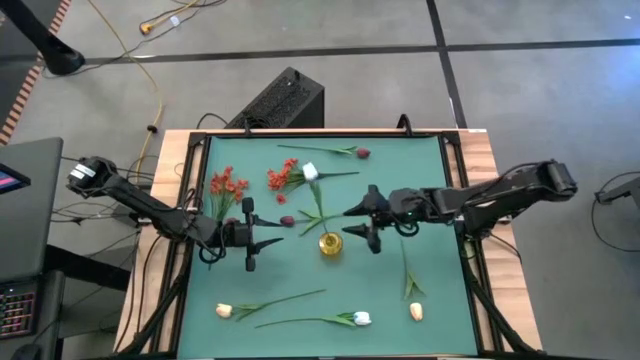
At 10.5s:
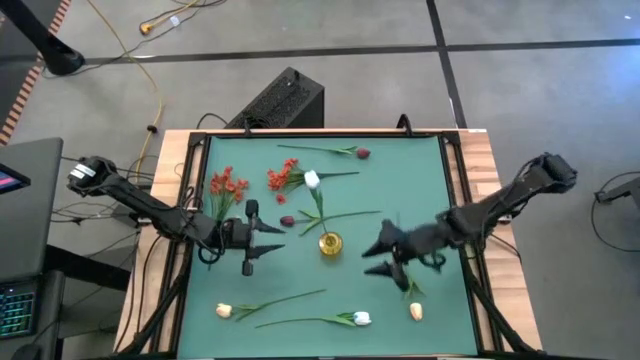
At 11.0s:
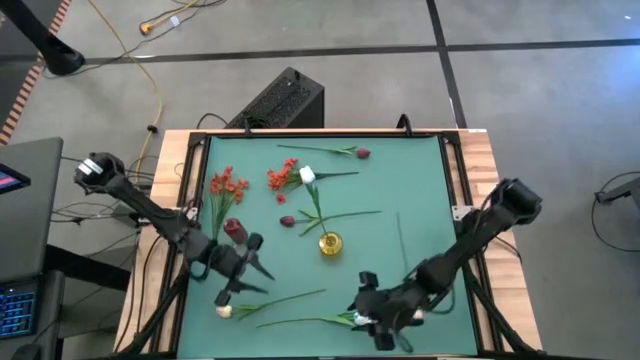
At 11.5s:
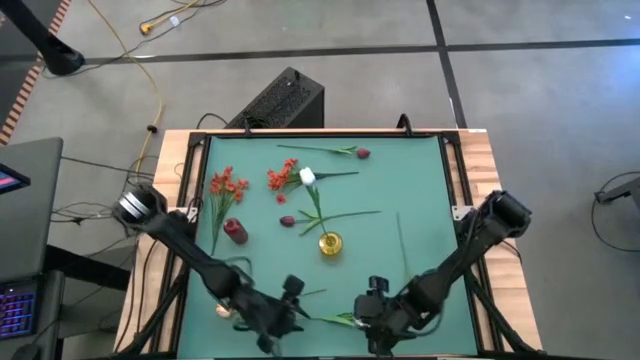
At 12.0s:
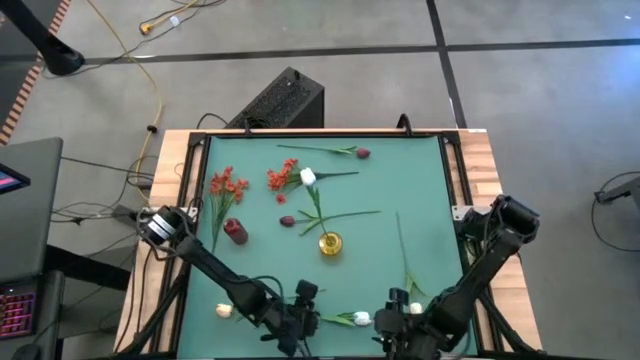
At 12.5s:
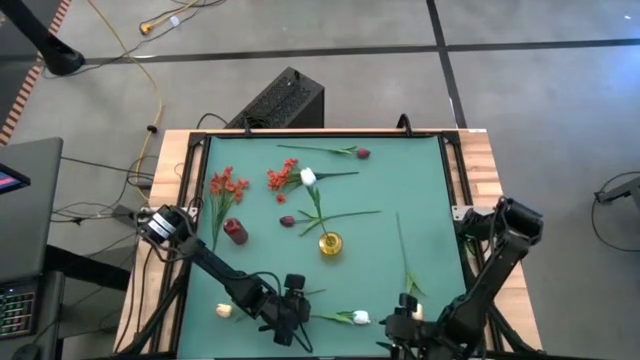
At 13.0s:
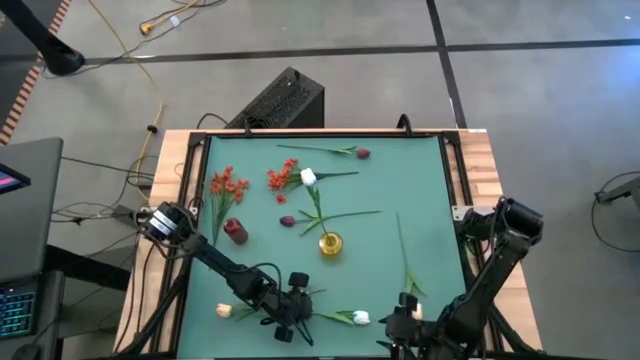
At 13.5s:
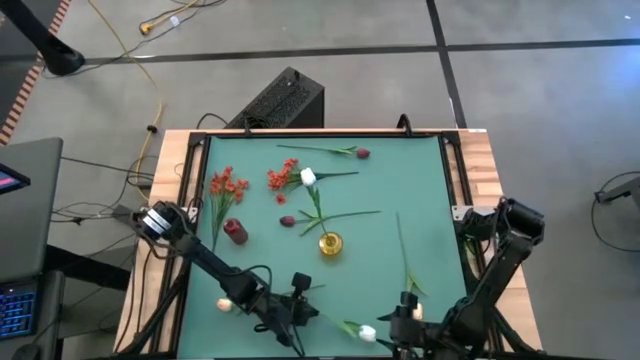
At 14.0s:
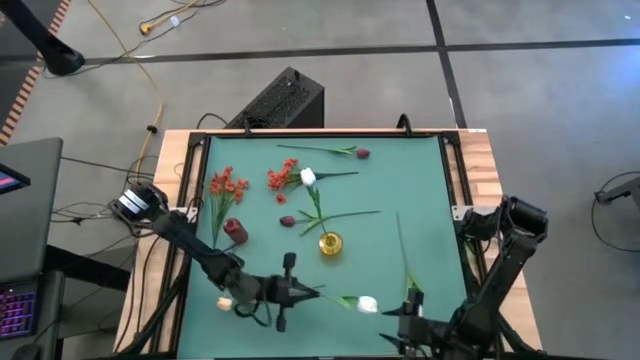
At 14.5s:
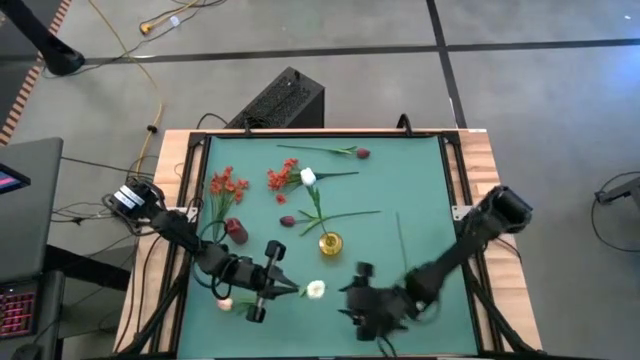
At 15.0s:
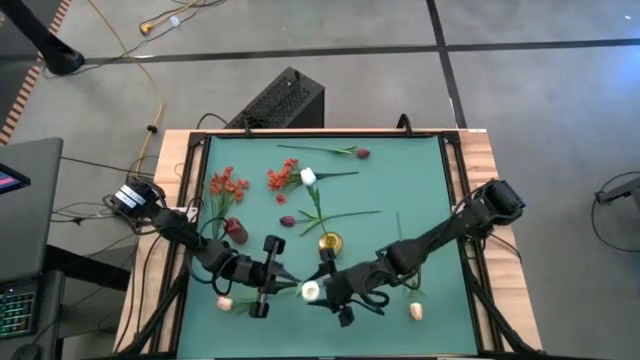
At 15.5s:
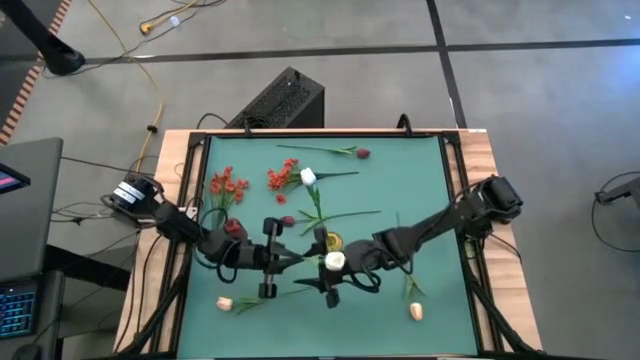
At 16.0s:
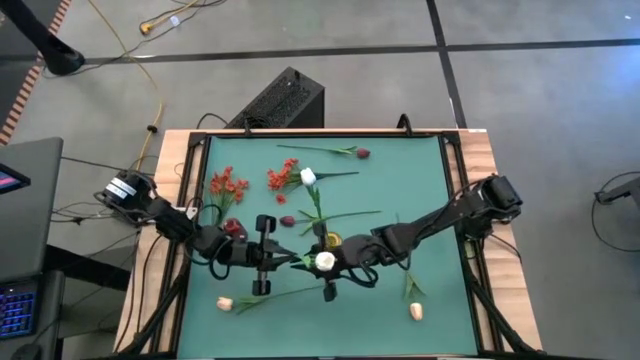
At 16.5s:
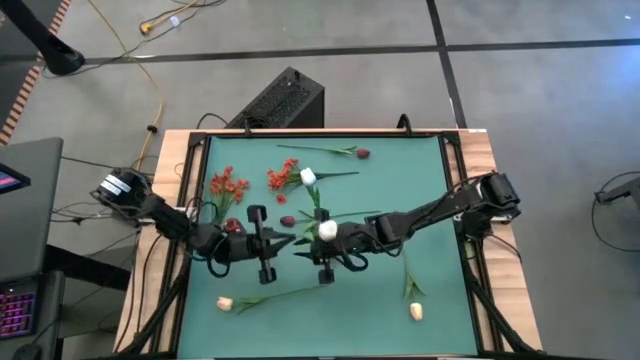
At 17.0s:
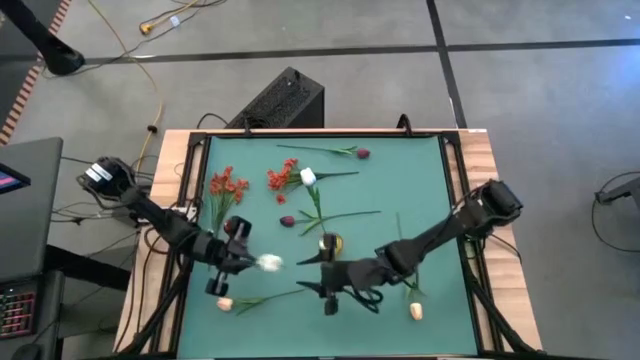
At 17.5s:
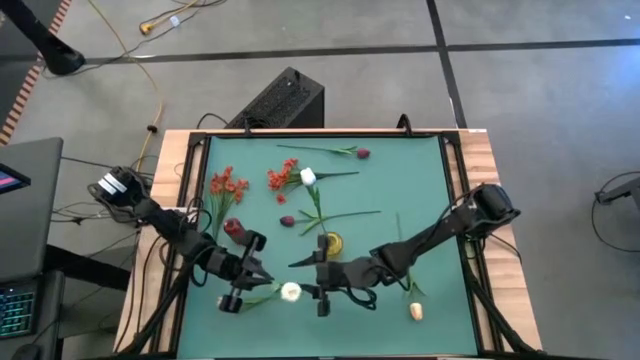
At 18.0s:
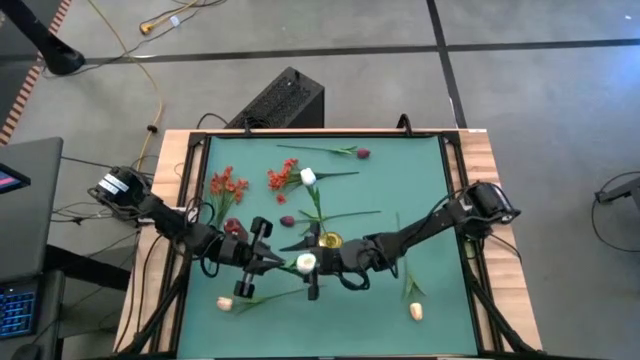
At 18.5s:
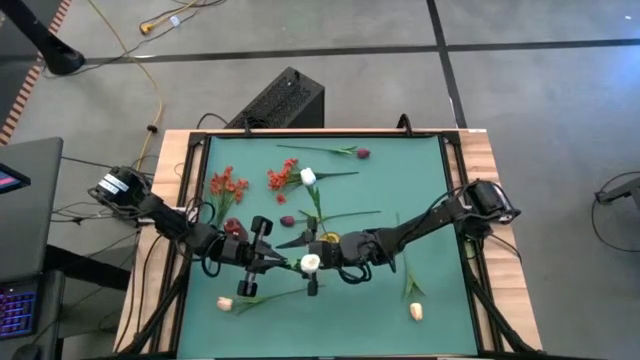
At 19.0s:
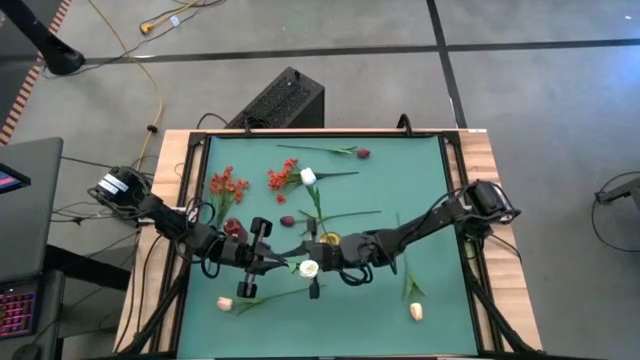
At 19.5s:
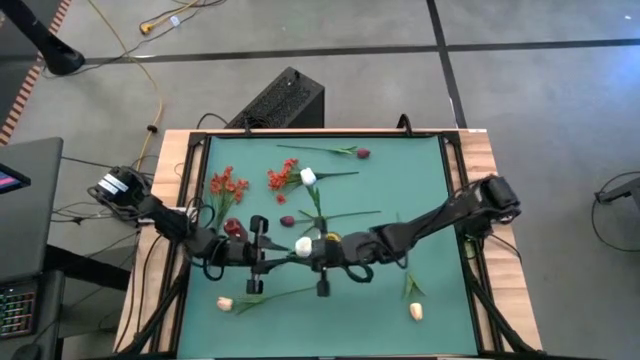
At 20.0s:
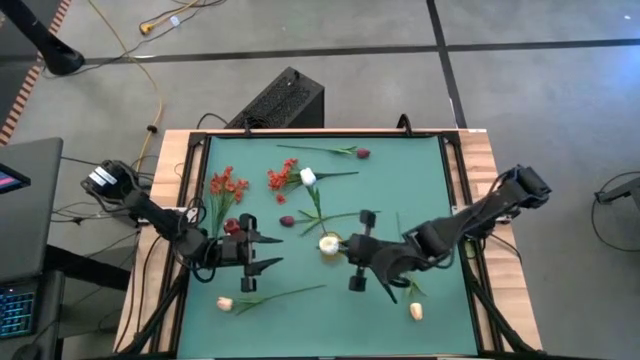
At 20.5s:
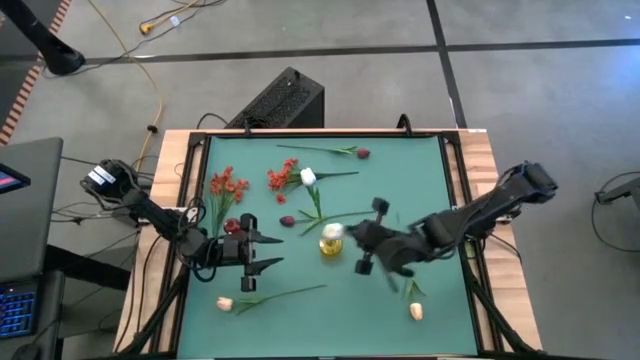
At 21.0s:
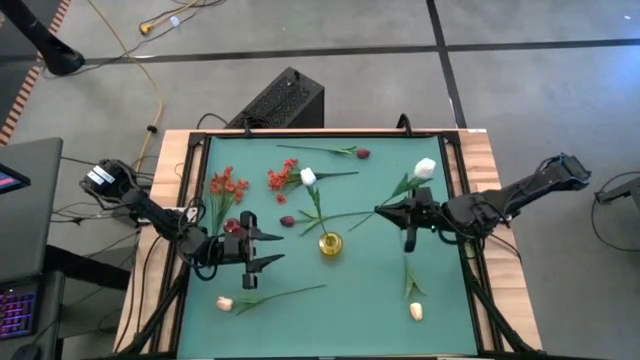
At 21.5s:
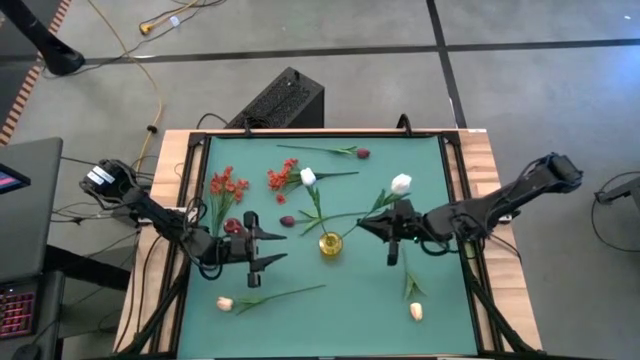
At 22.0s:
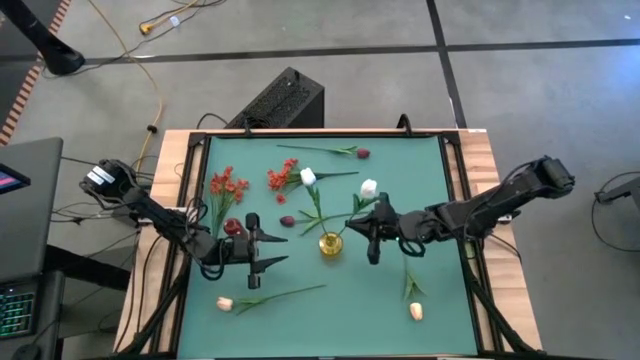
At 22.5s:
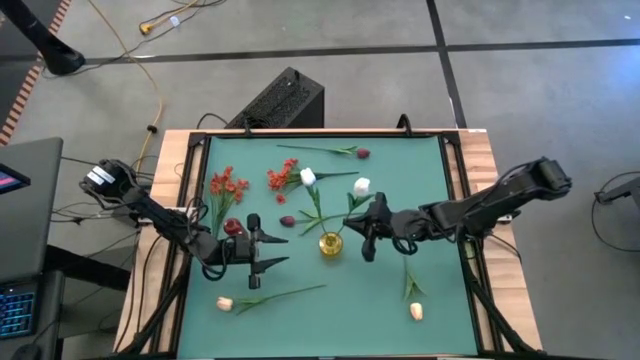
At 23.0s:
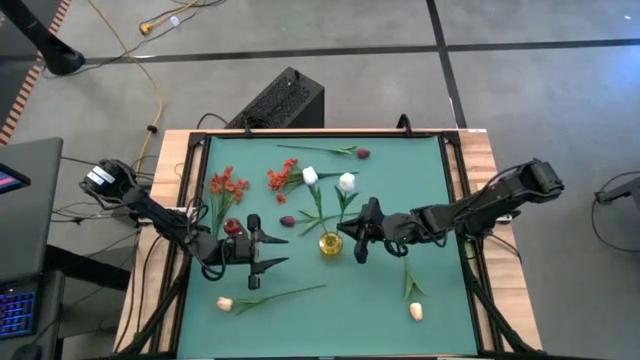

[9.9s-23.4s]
Task: Sort flowers into vase by color
Put the white flower into the yellow vase

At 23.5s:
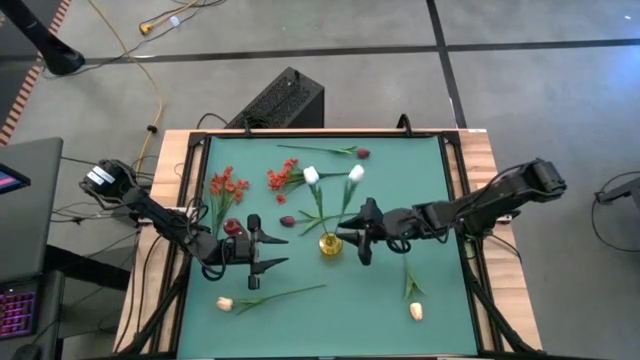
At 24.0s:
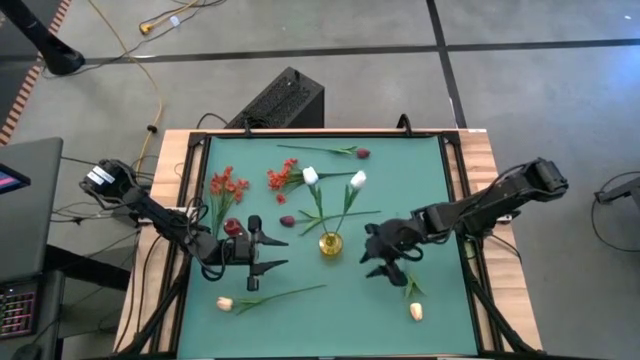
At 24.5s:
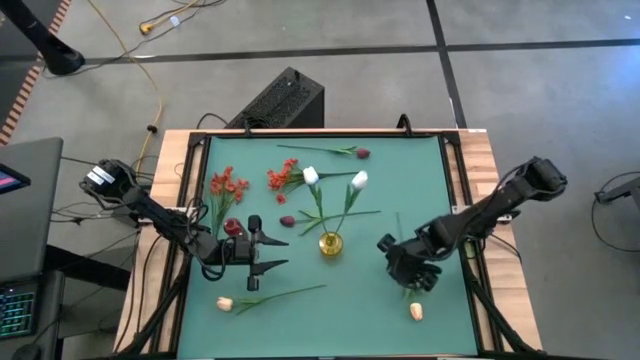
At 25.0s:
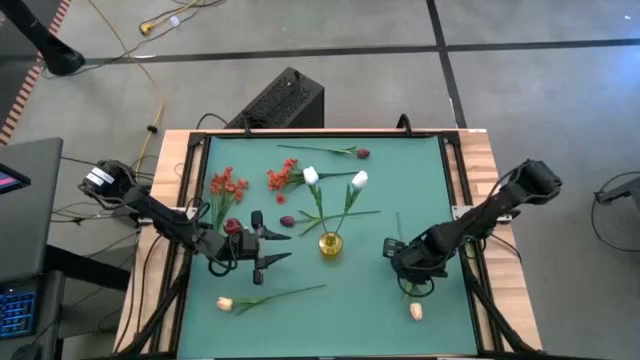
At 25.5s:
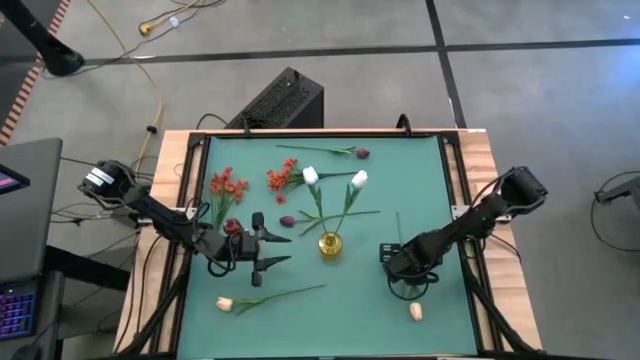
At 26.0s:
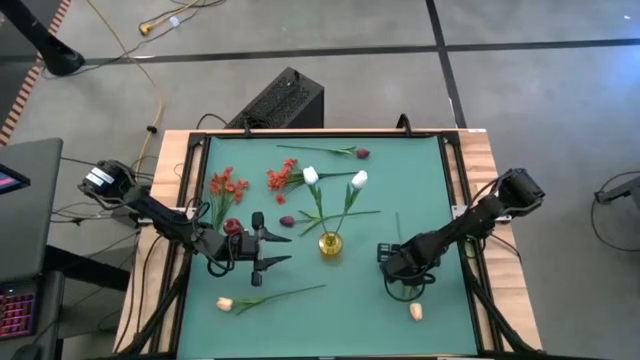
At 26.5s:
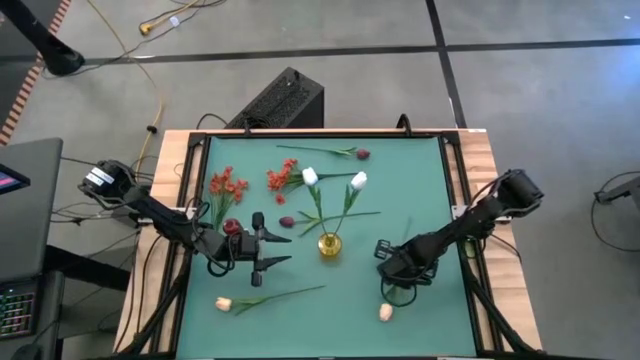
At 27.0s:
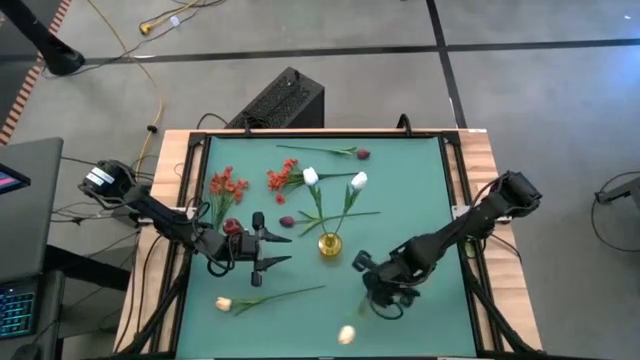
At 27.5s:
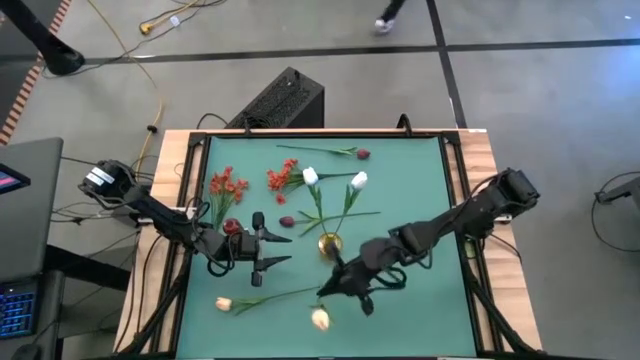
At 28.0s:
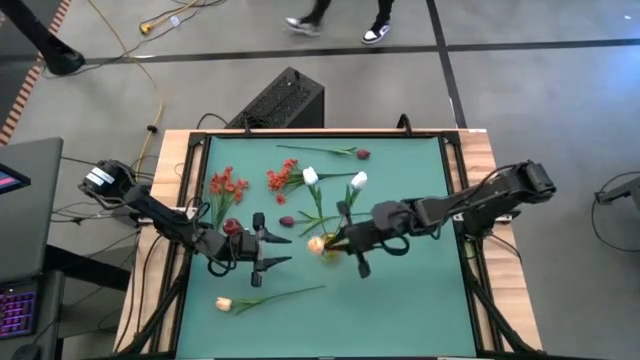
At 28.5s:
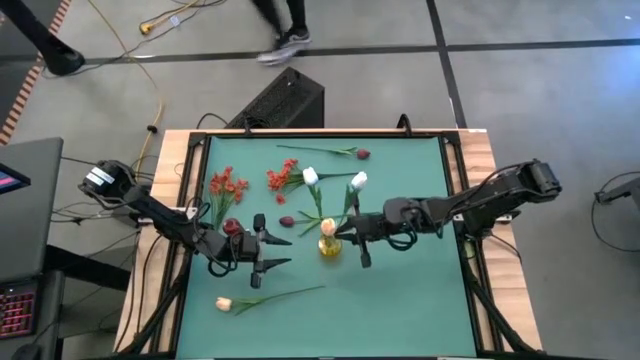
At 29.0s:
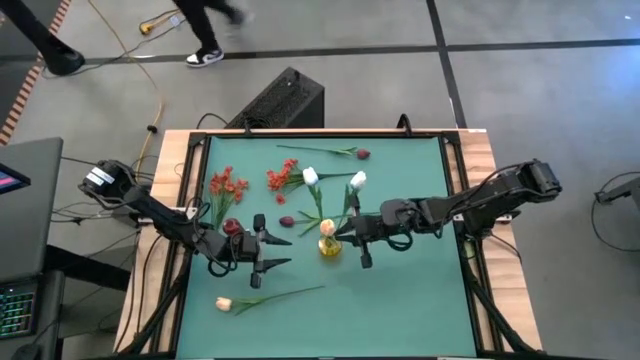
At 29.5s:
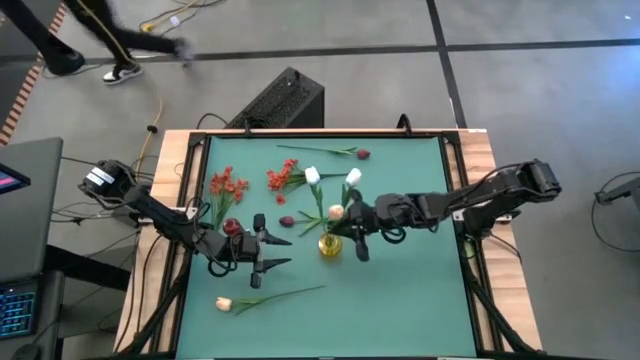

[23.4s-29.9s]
Put the right yellow flower into the yellow vase
